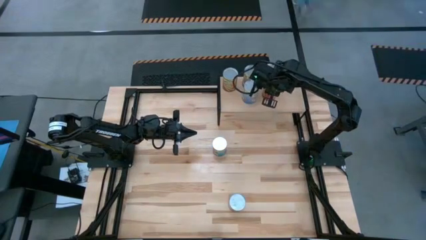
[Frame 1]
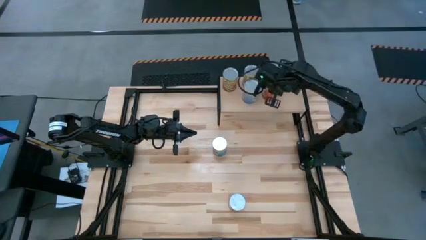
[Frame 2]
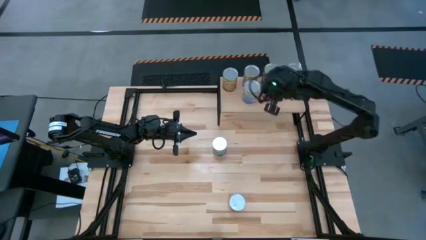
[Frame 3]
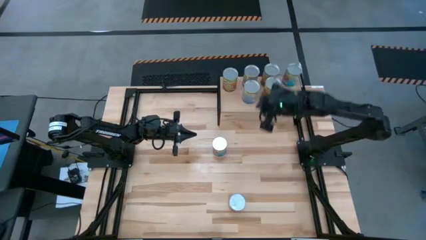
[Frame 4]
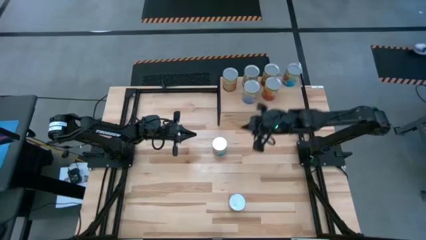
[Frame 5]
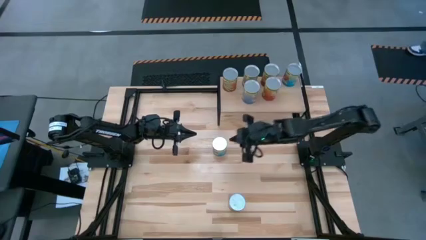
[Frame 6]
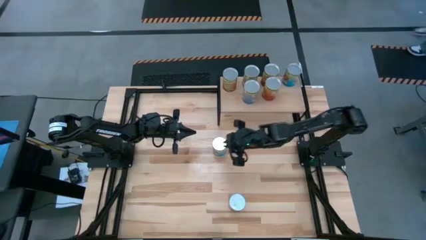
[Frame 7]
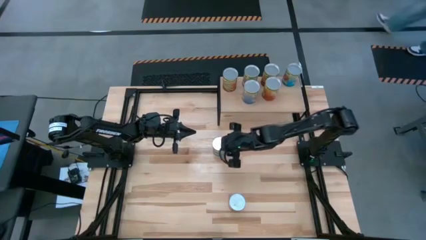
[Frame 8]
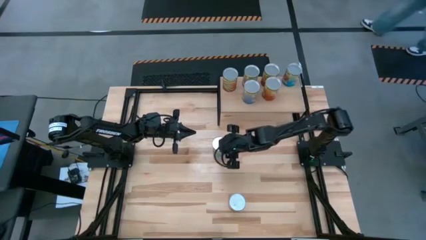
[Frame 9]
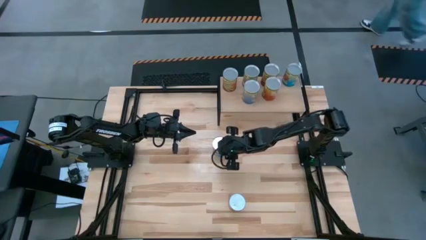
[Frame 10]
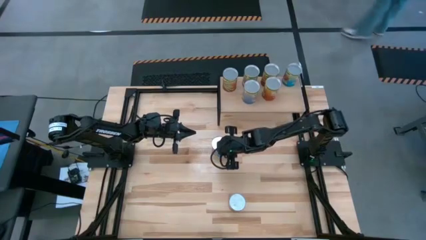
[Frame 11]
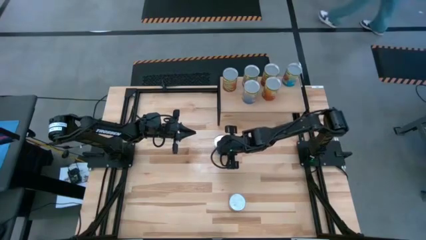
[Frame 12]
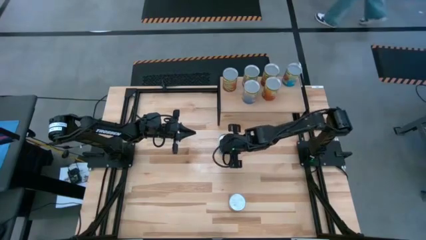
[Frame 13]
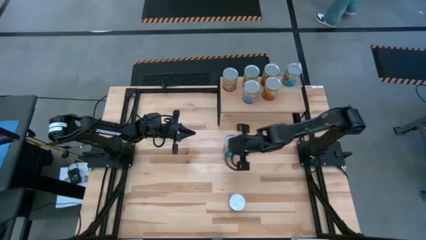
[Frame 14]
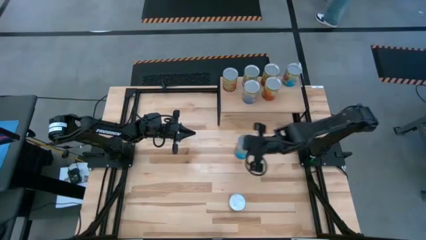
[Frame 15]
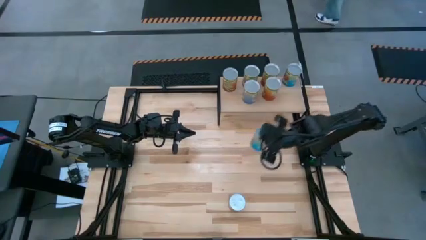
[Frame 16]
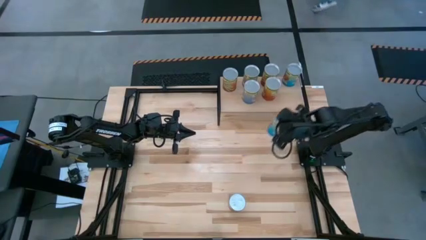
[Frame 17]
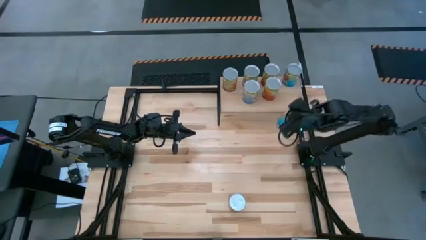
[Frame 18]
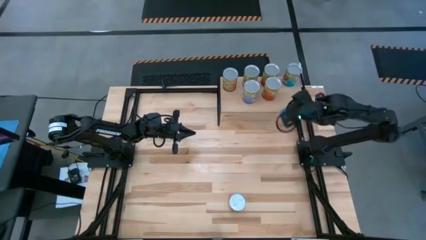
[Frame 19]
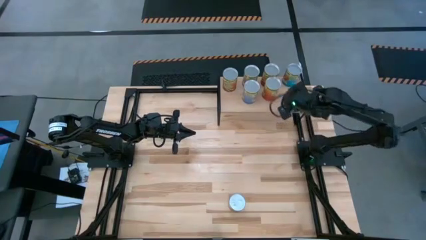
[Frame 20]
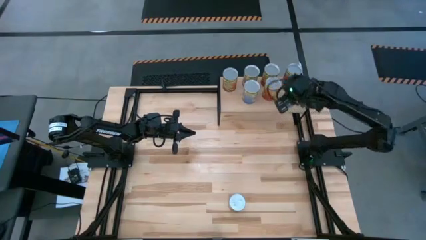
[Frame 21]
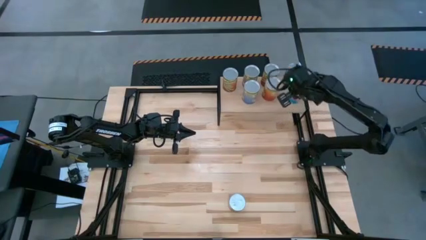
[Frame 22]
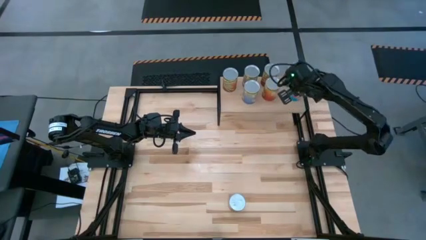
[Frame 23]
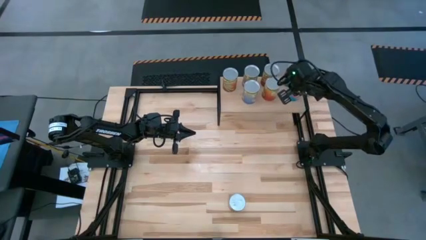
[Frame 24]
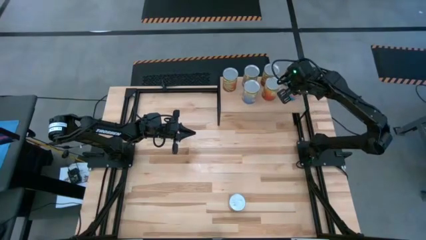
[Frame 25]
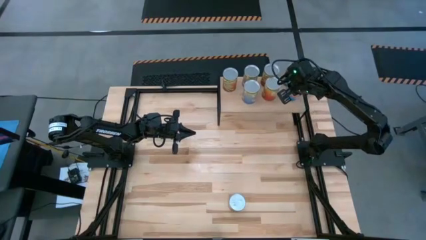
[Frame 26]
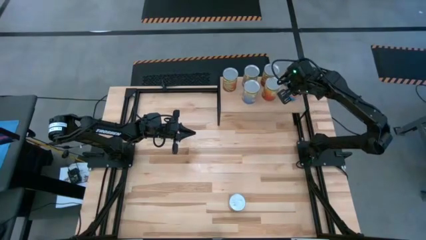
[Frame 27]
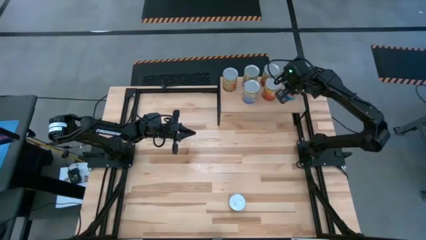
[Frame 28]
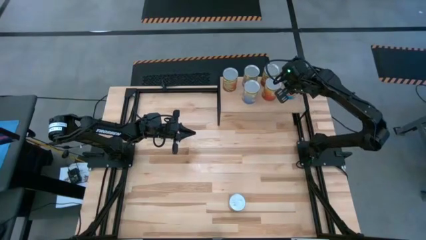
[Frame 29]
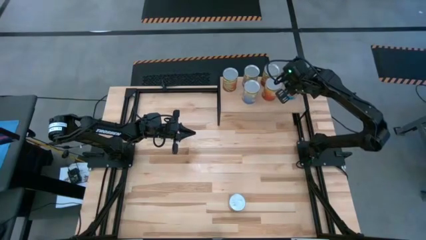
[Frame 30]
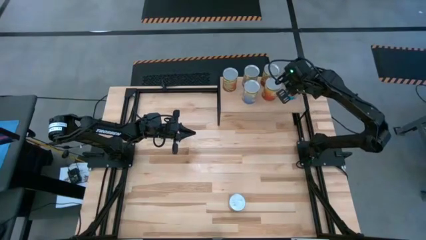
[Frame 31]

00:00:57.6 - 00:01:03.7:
Task: Pick and place cans onto a shelf
Put the canned tomatoes on the shelf aligned with the other canned tomatoes

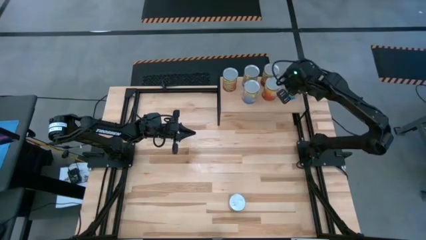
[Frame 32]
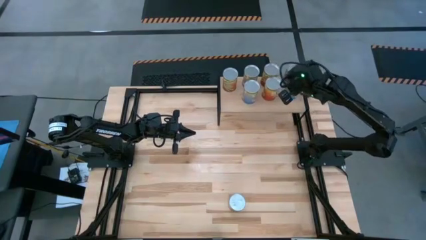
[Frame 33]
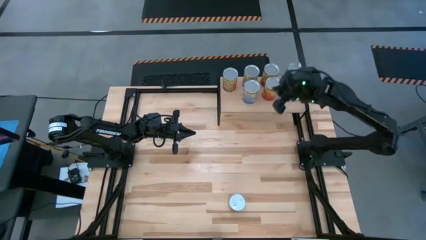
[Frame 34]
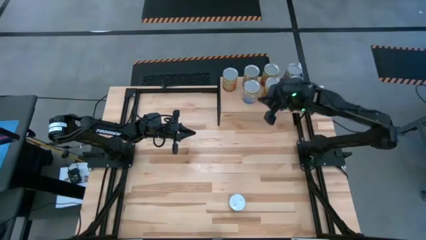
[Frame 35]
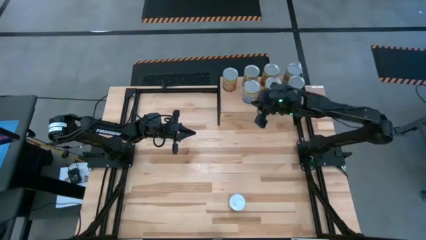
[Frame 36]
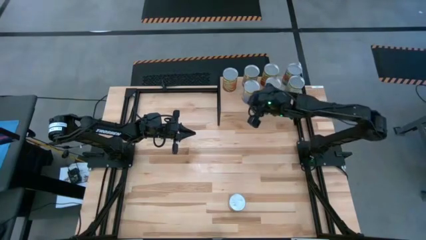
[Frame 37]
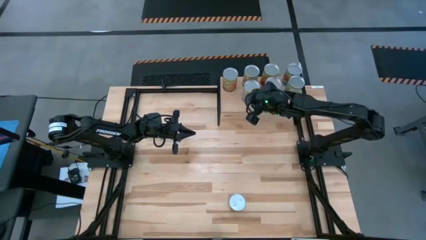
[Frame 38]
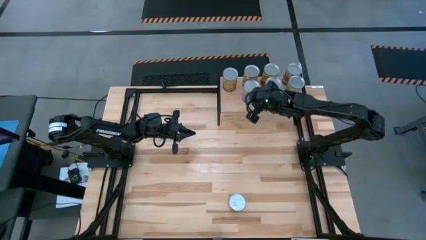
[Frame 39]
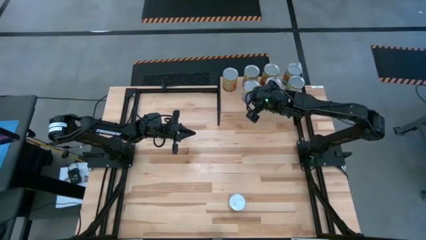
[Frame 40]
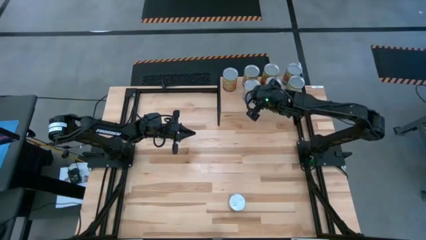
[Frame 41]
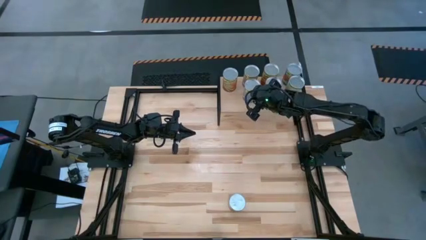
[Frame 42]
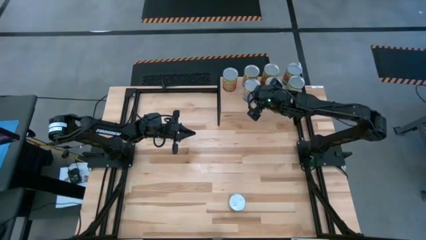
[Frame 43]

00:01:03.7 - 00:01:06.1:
Adjust the canned peaches on the shelf

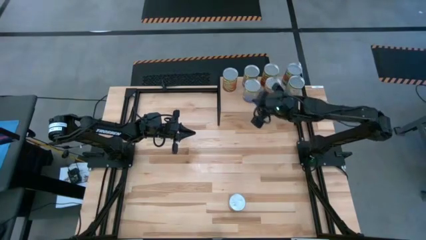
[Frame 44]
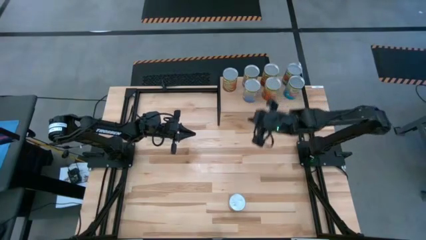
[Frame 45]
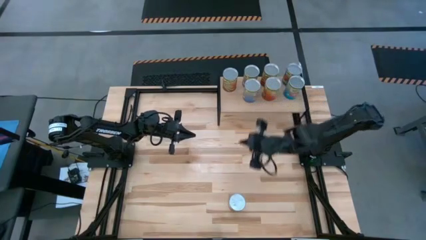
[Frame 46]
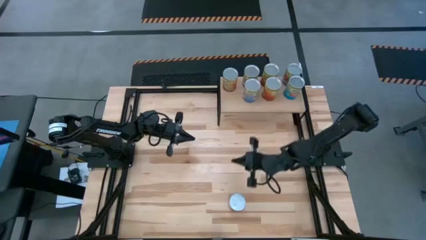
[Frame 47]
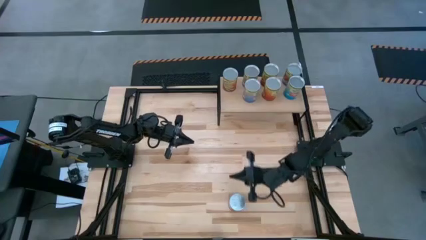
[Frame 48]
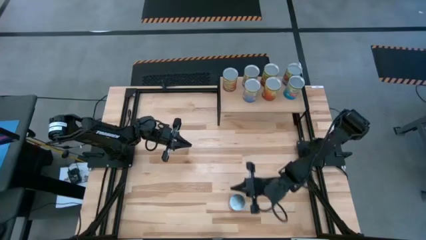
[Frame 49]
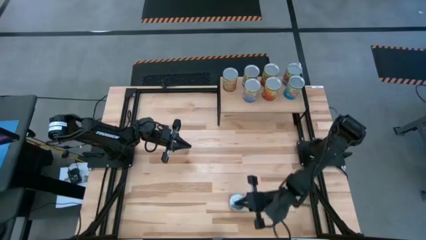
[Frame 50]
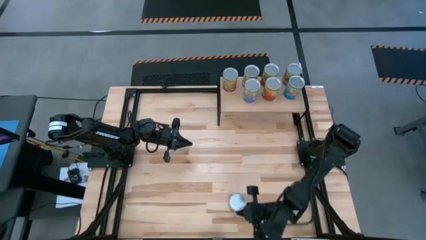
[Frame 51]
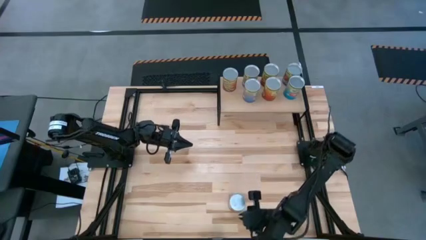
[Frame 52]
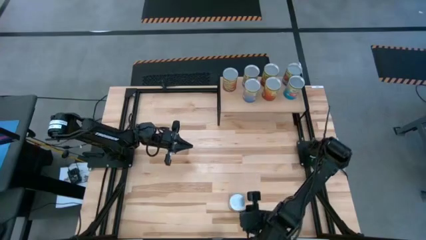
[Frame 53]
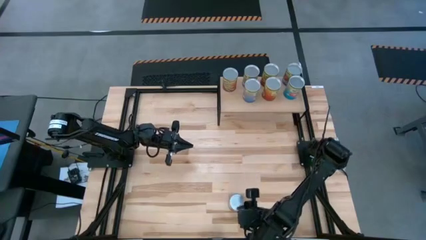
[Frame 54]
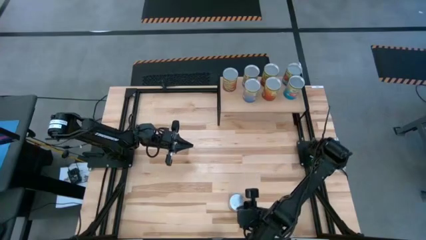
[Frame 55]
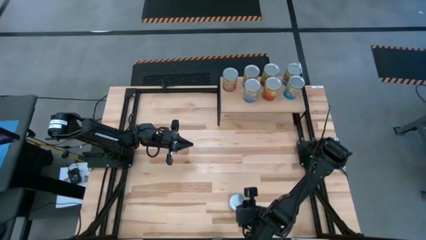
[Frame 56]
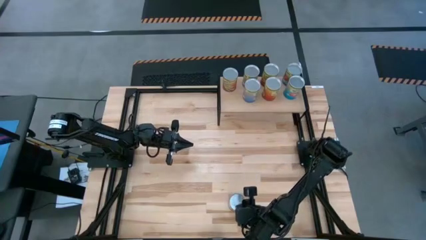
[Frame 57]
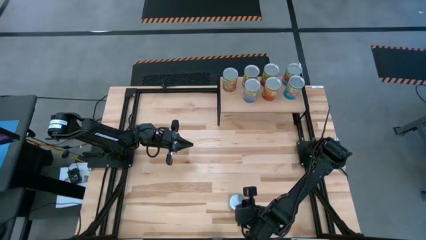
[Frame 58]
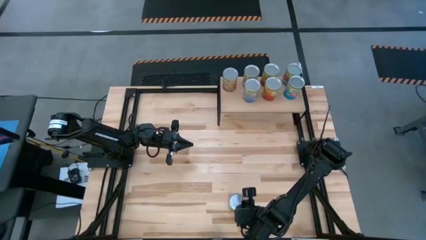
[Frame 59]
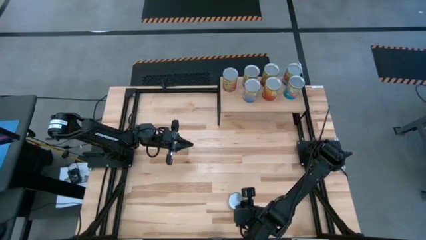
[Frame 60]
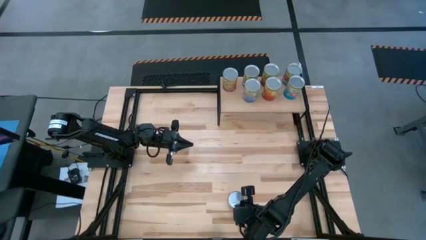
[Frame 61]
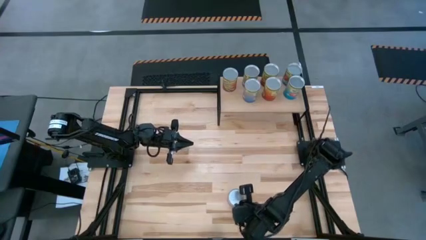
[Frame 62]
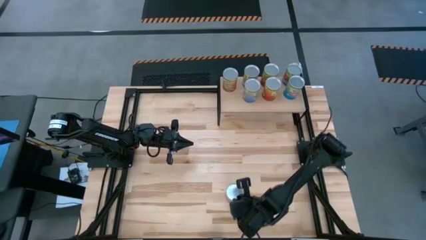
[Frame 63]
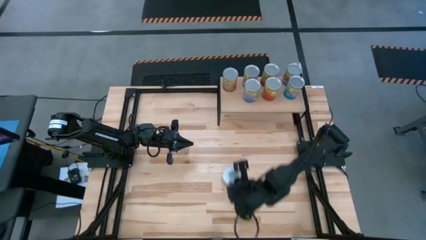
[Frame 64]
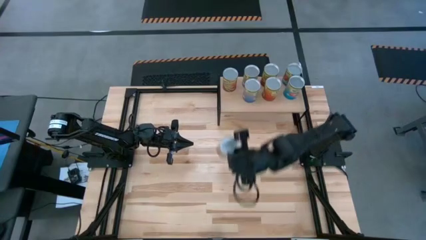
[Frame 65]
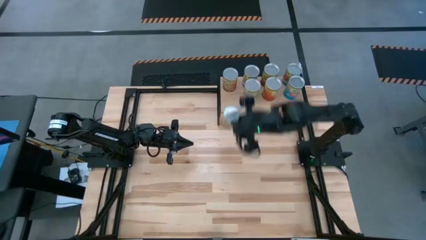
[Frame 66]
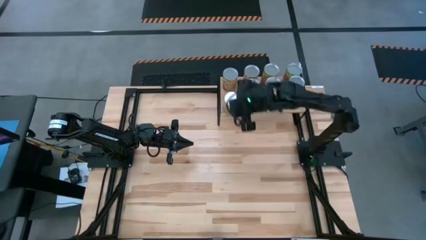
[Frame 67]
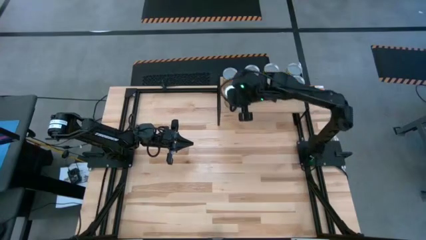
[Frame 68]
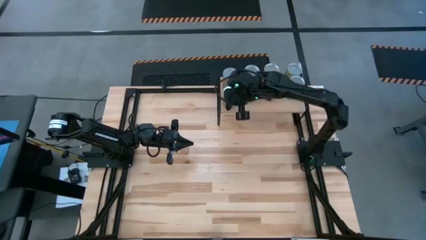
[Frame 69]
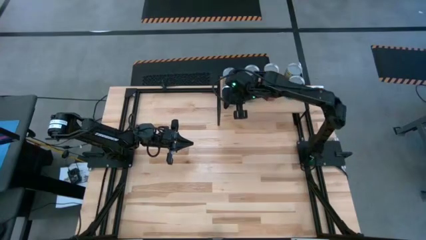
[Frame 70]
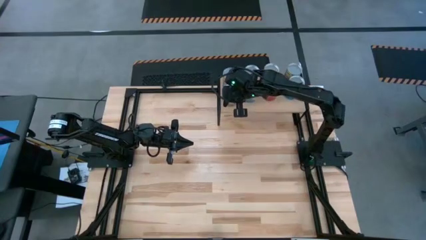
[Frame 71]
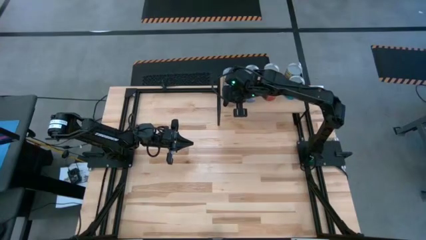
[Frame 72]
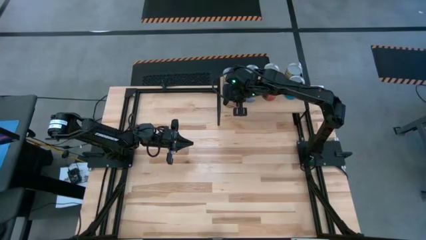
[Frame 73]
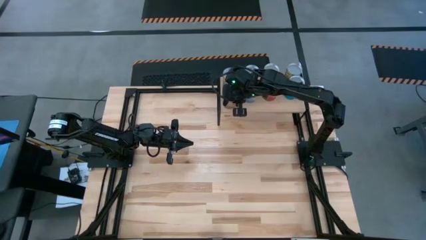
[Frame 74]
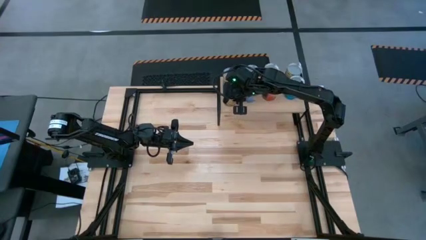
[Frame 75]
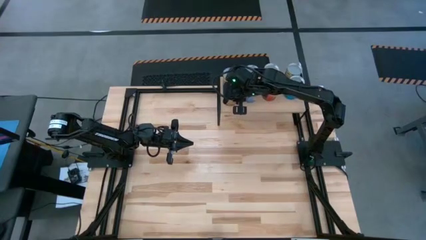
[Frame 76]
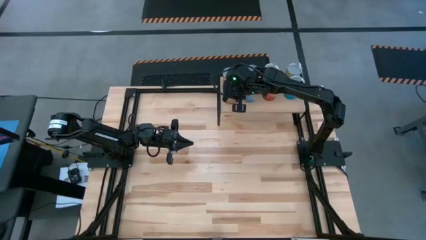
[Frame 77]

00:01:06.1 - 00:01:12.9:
Put the canned green beans on the shelf aligned with the other canned green beans

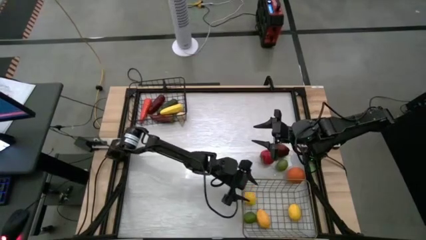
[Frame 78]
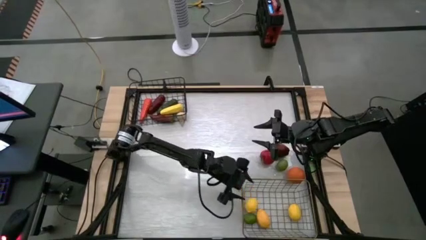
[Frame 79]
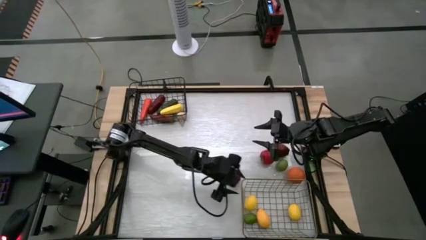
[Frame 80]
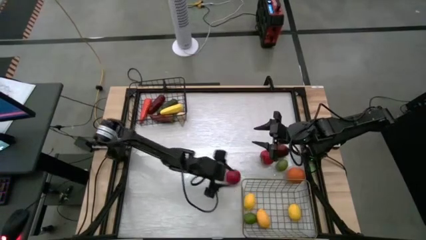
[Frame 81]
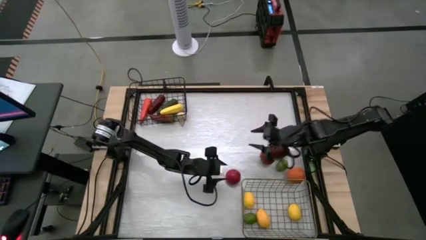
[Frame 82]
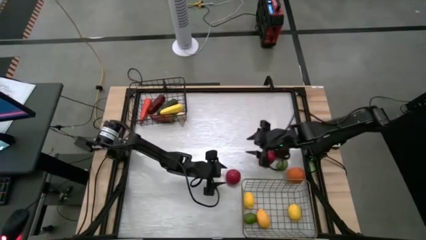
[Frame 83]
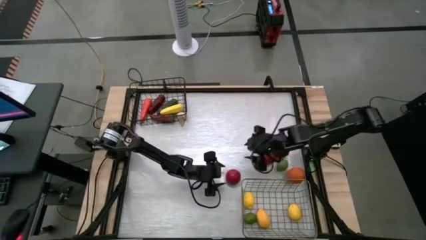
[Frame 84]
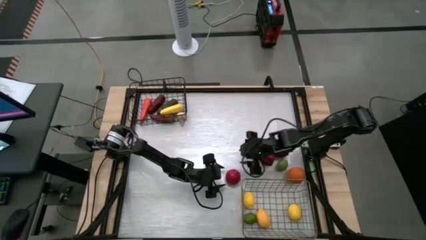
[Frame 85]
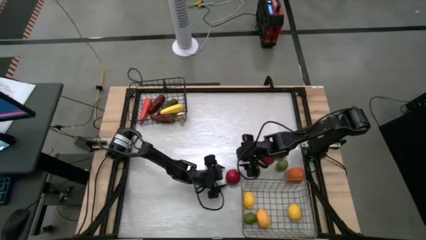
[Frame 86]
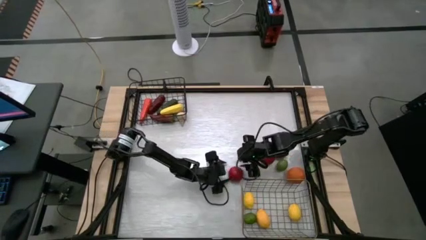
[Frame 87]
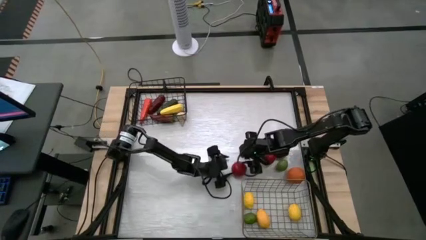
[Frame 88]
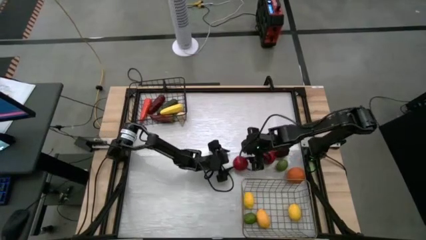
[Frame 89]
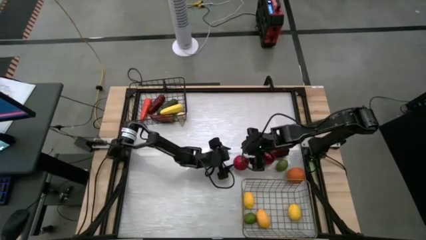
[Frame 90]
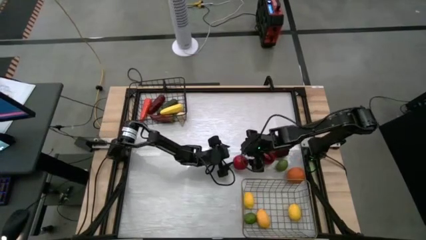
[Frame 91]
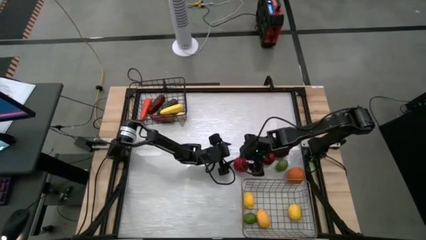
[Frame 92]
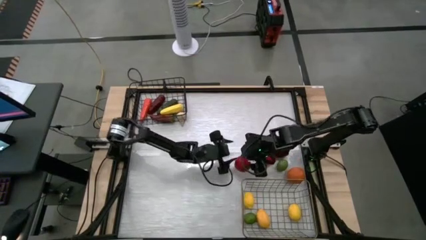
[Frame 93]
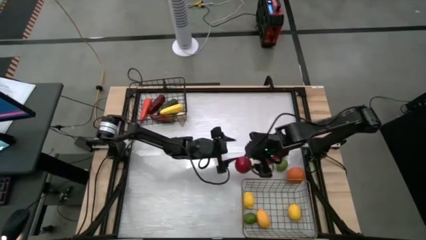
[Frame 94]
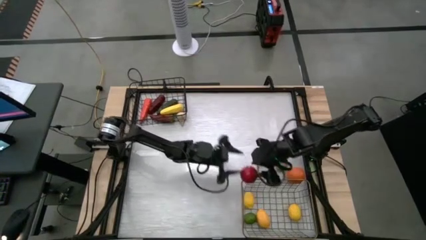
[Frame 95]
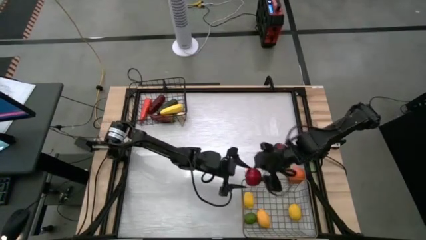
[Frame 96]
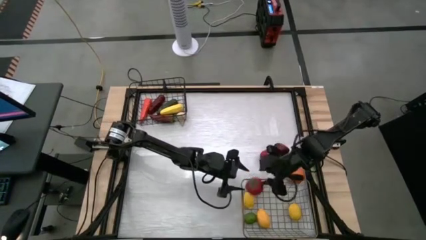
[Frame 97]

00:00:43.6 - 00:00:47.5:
Task: Sort produce into baskets
Put the left tomato into the gold wire basket
